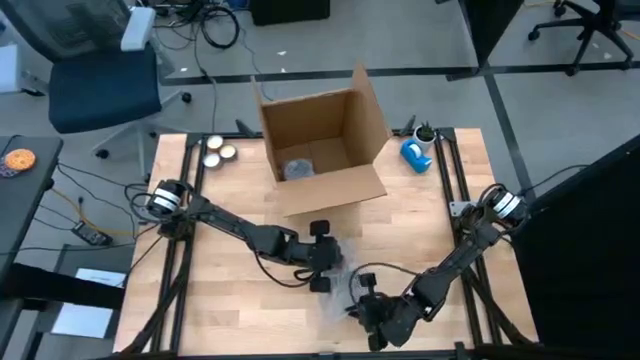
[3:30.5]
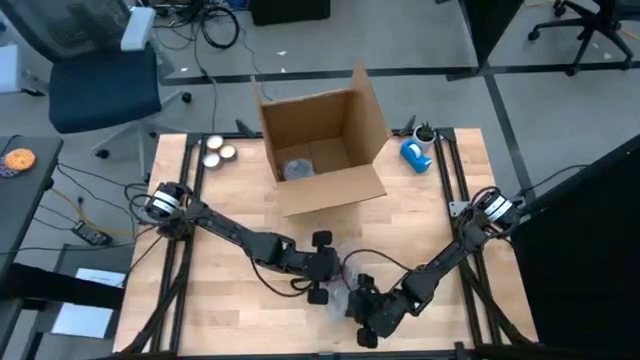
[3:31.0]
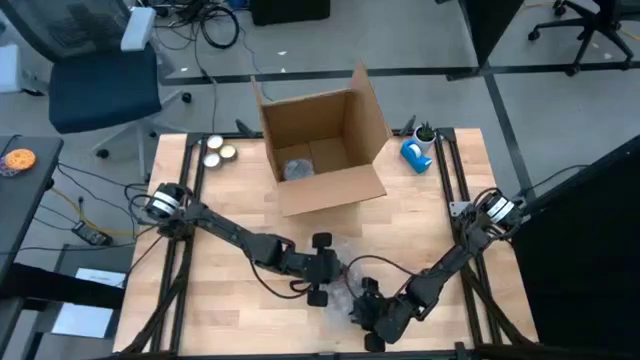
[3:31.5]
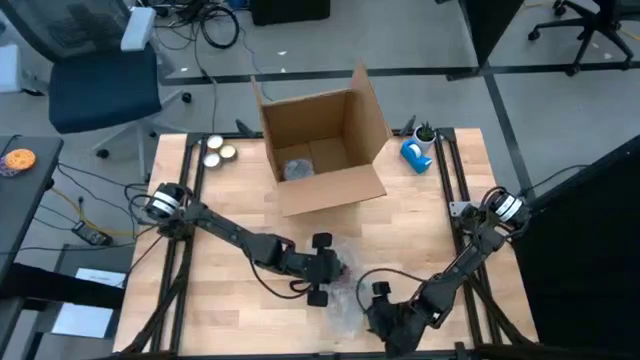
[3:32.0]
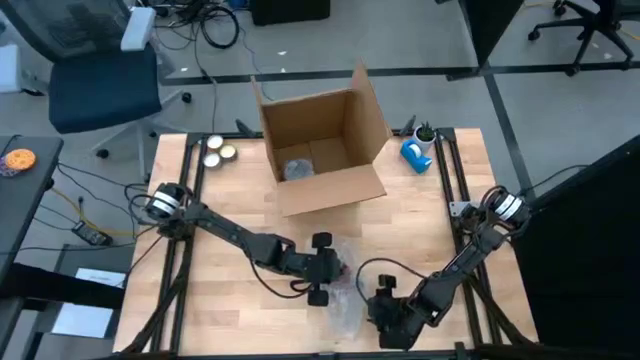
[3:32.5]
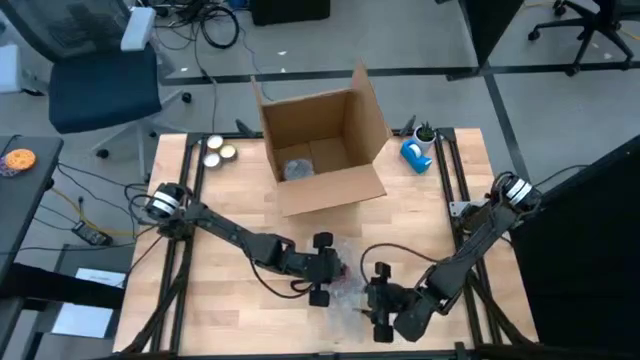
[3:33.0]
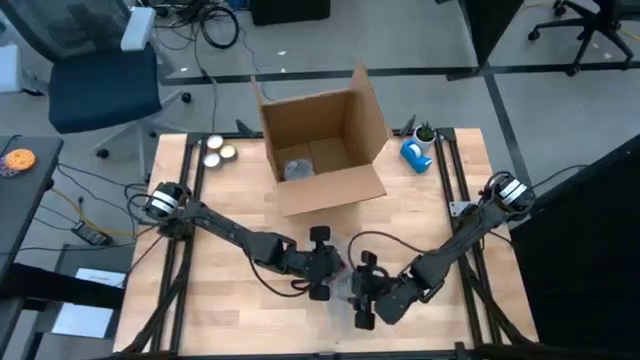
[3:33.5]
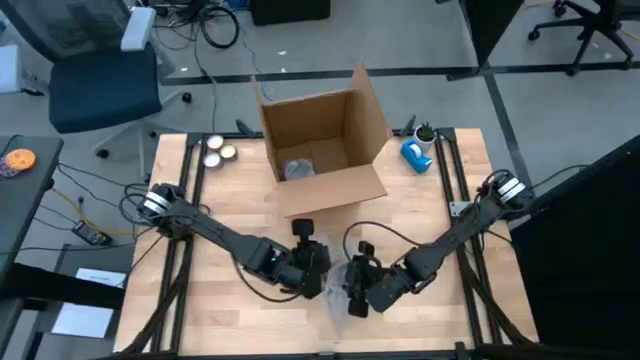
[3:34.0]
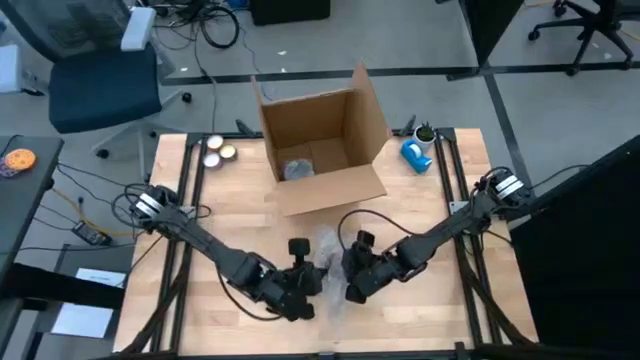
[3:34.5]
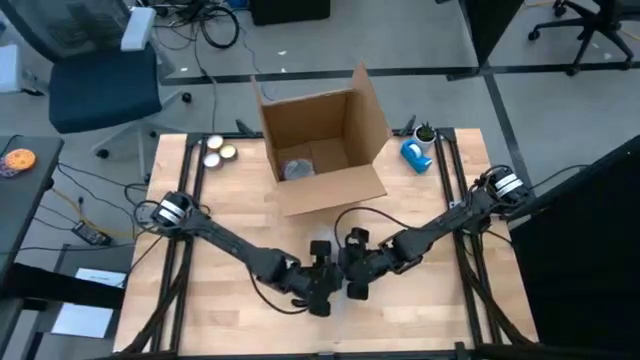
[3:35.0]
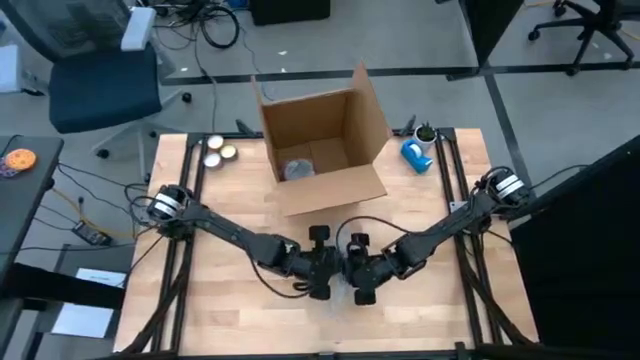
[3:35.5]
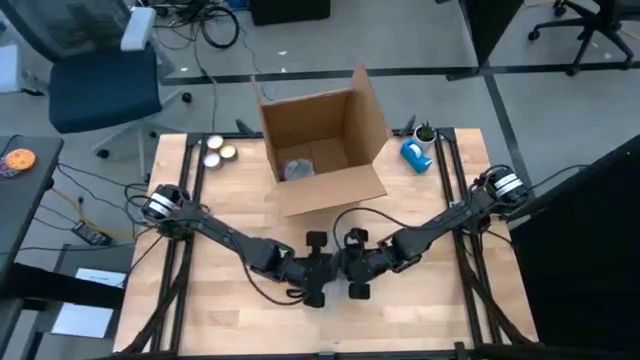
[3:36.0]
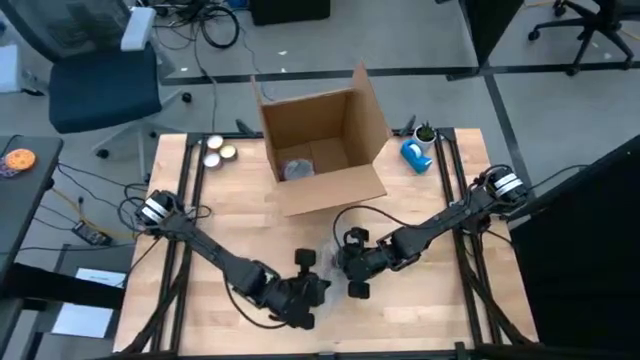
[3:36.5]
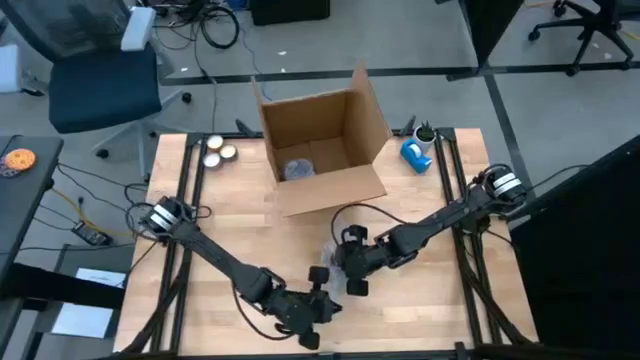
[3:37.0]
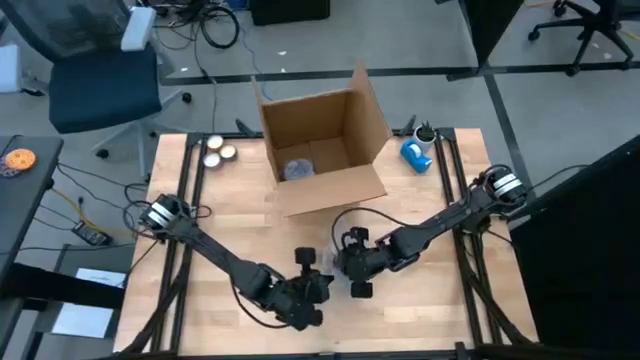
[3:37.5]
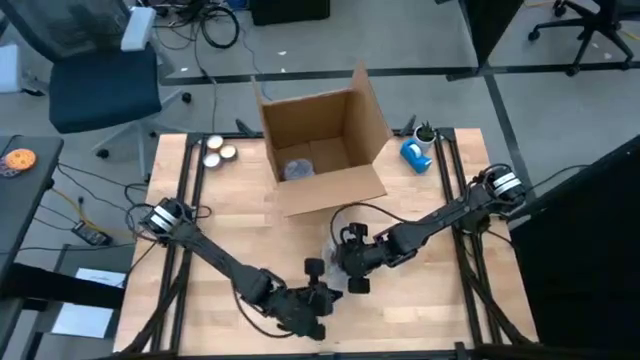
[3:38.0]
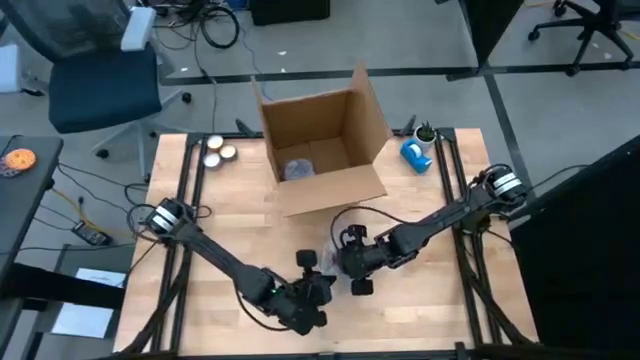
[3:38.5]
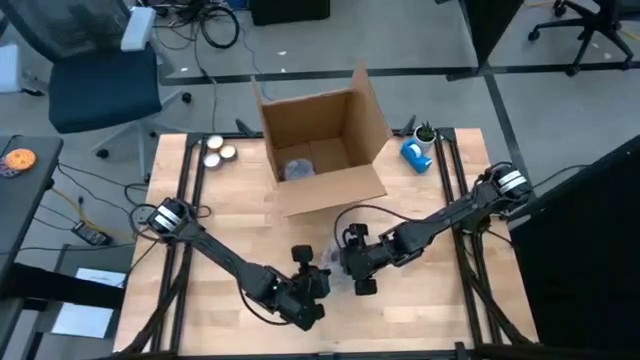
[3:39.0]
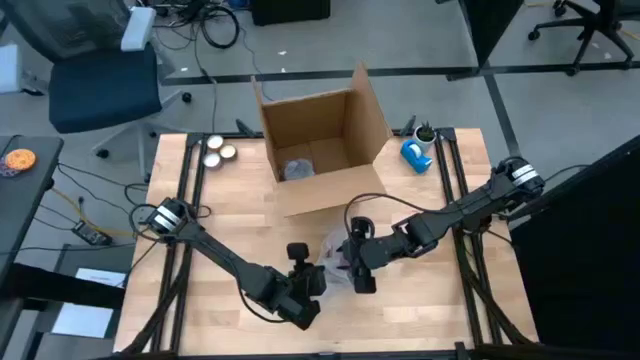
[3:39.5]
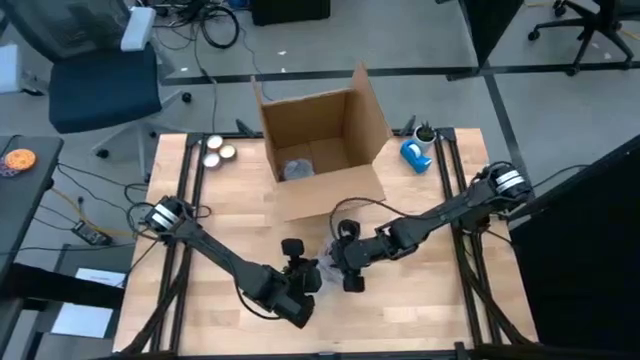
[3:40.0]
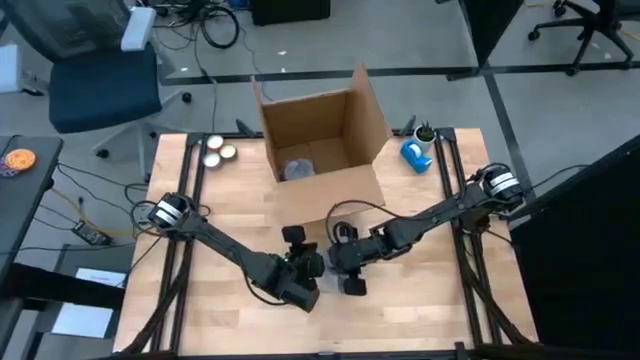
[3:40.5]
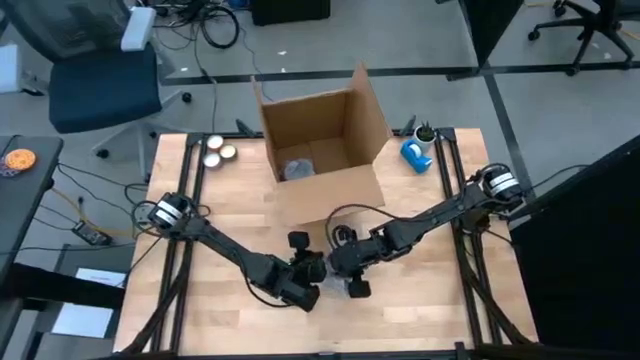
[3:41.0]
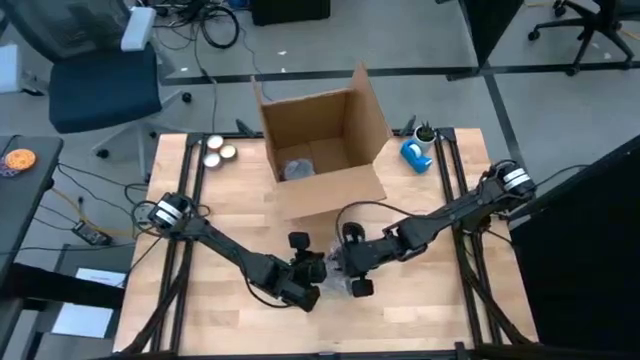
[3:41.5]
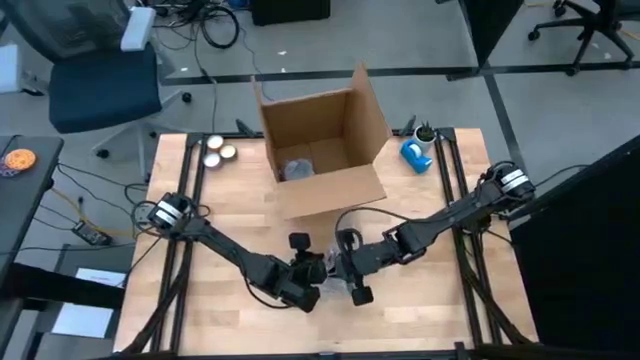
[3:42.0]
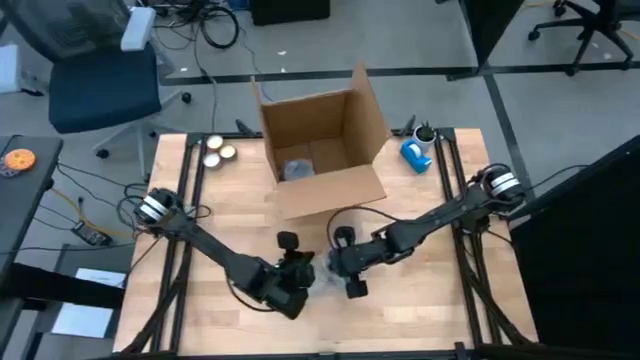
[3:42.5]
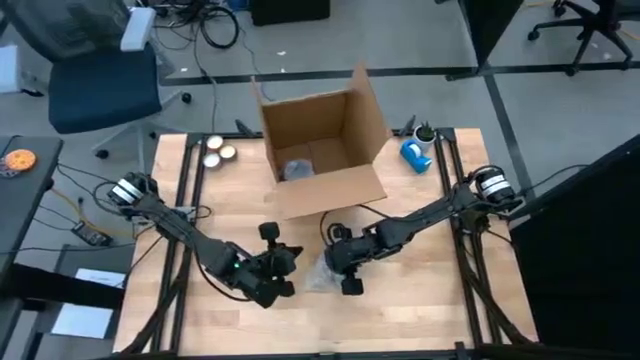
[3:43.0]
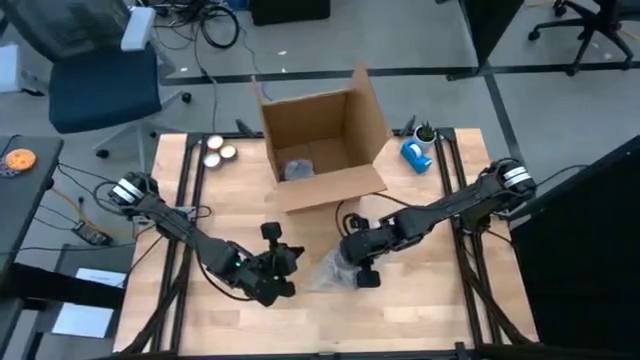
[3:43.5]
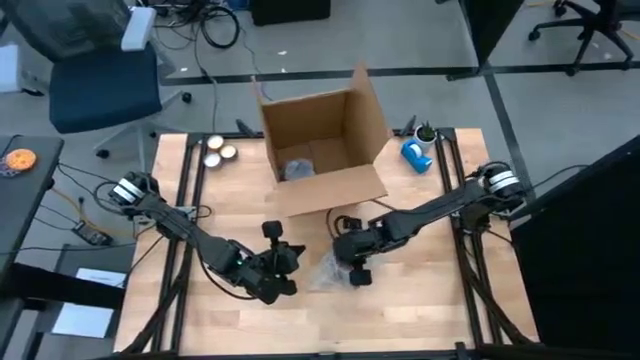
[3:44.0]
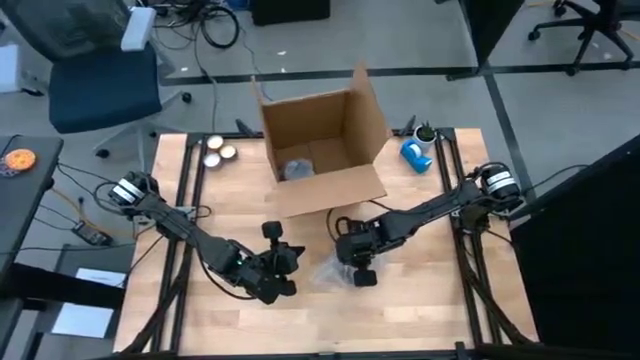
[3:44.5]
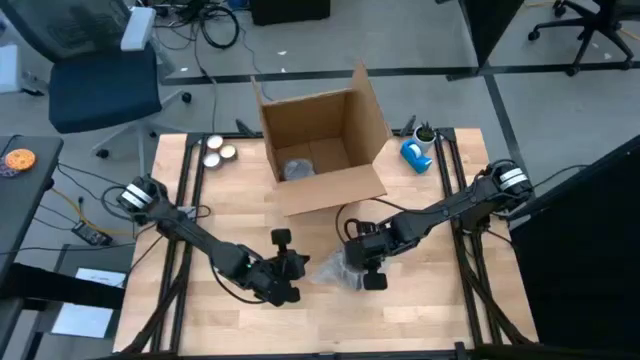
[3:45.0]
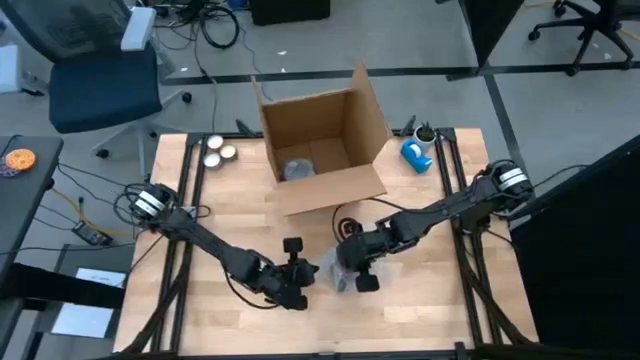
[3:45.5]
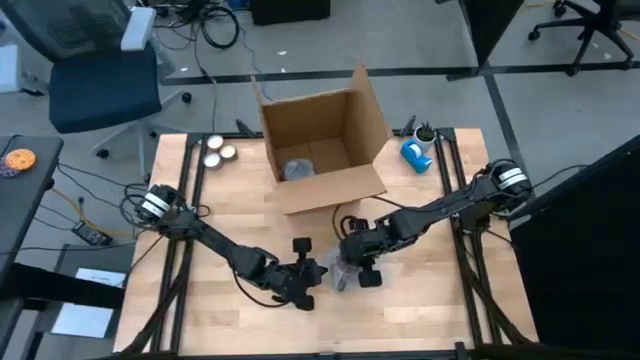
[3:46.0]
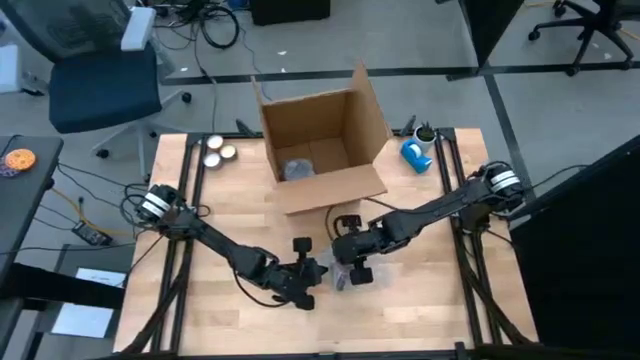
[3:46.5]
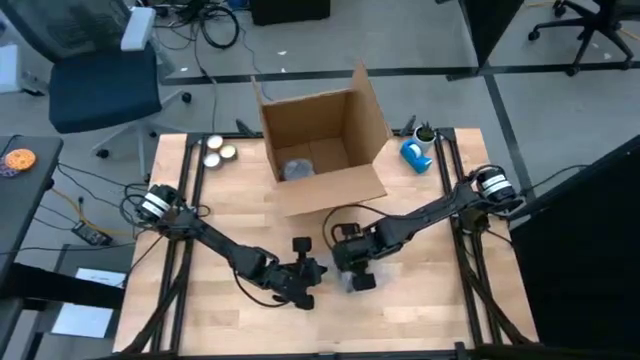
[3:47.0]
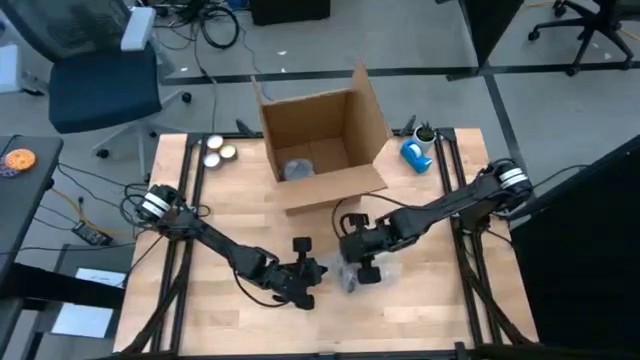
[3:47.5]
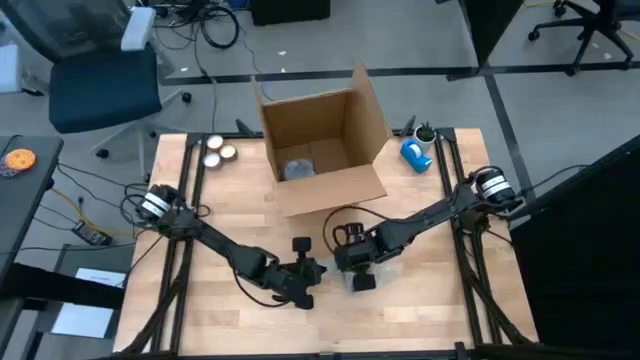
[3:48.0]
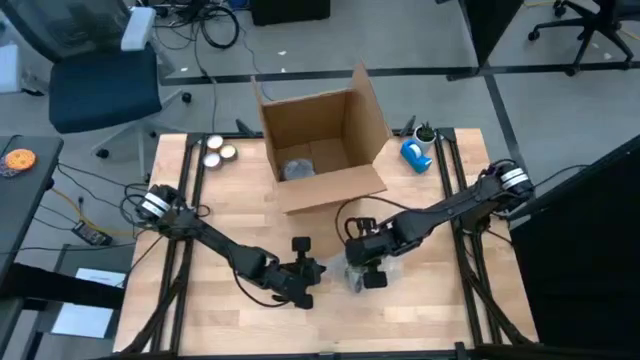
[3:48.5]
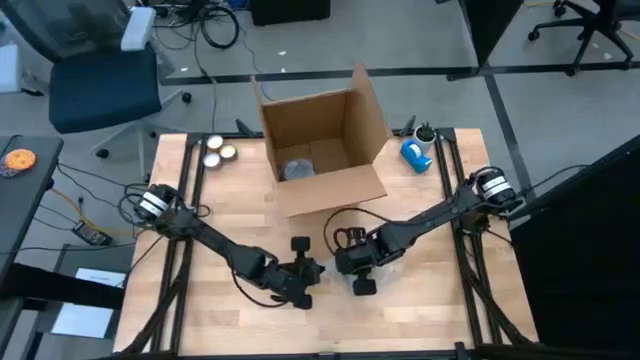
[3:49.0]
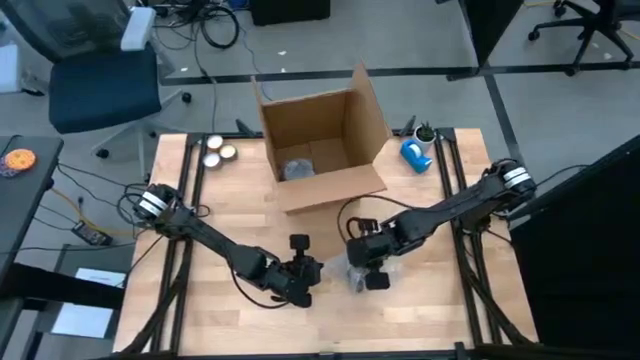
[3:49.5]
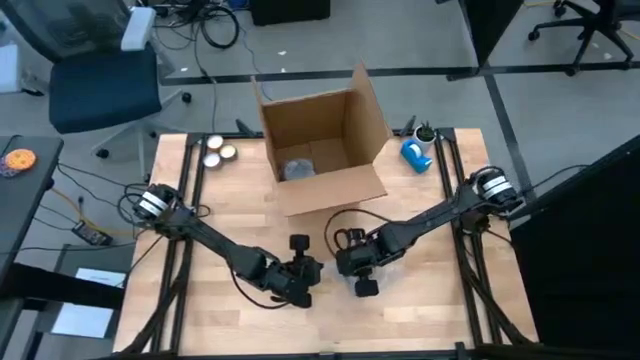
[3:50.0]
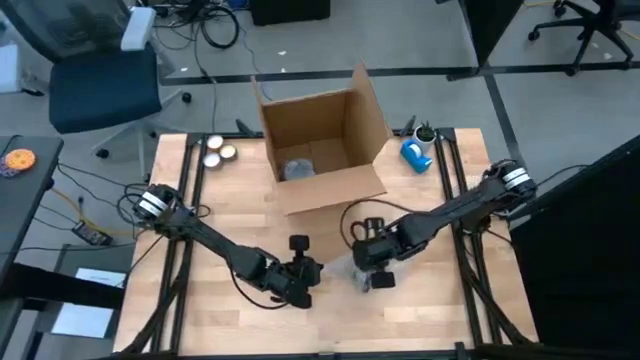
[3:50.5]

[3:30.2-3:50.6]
Task: wrap mug
Wrap the black mug with the bubble wrap
